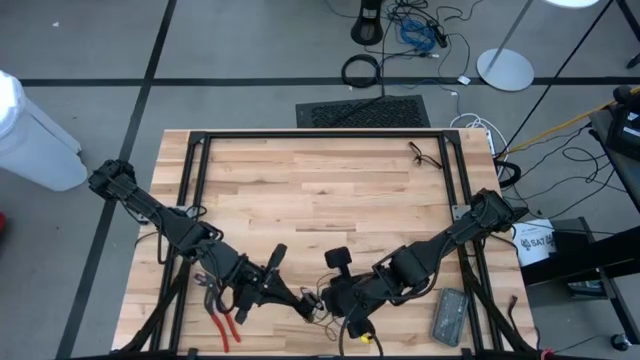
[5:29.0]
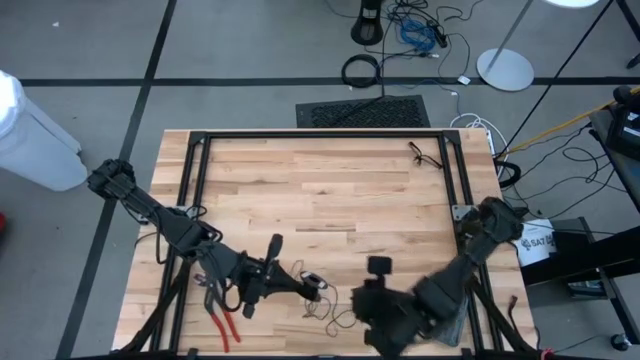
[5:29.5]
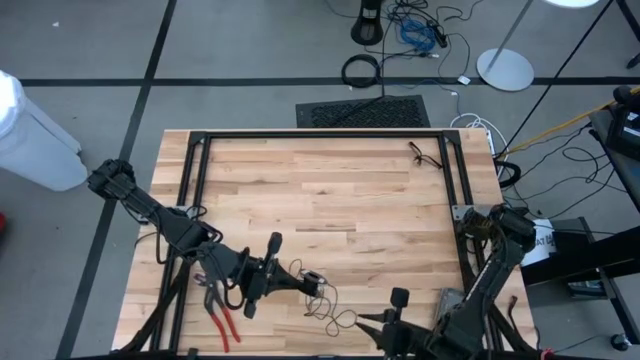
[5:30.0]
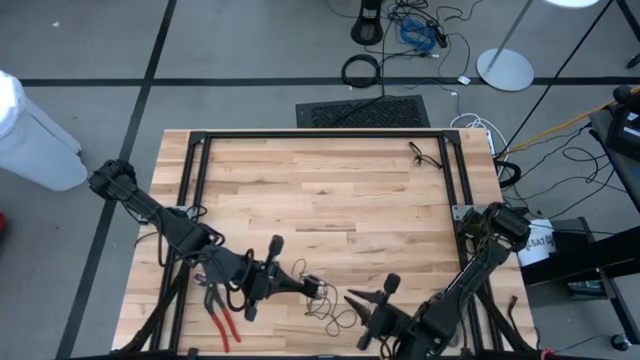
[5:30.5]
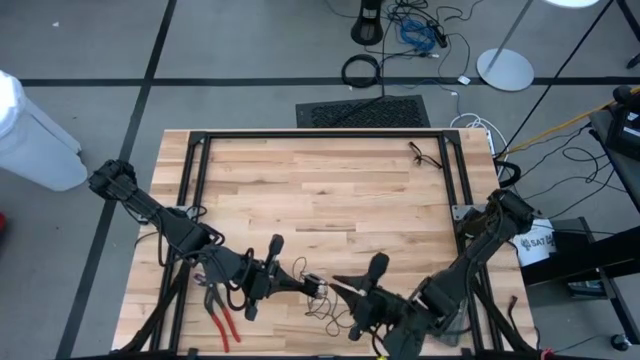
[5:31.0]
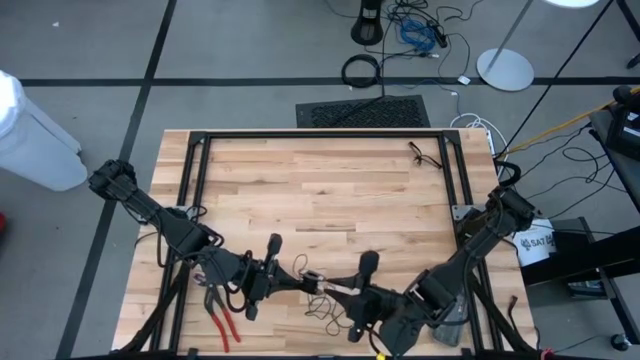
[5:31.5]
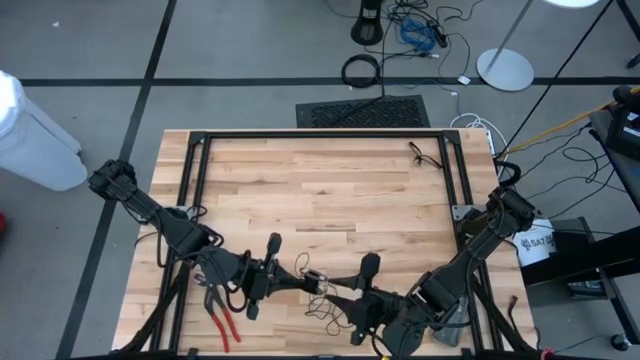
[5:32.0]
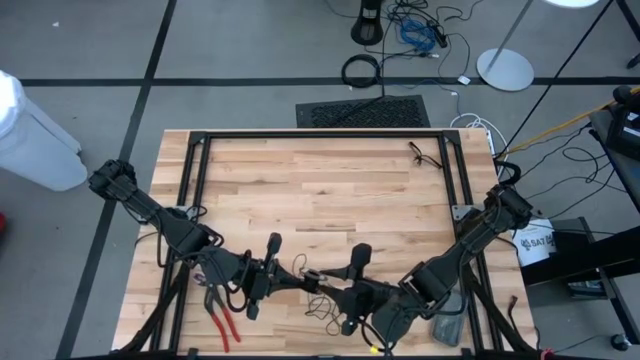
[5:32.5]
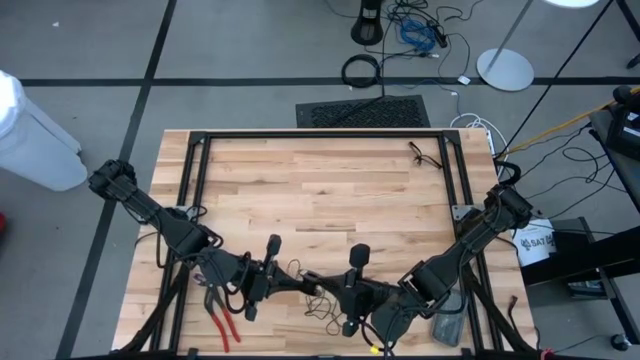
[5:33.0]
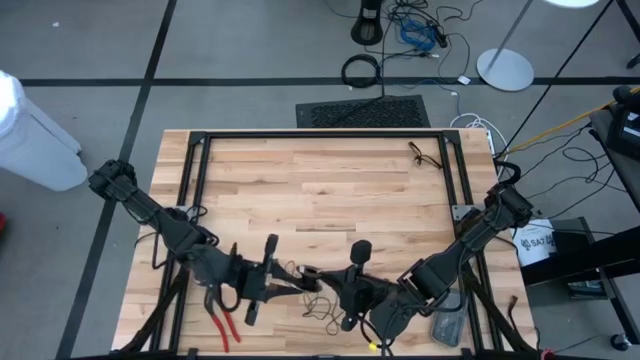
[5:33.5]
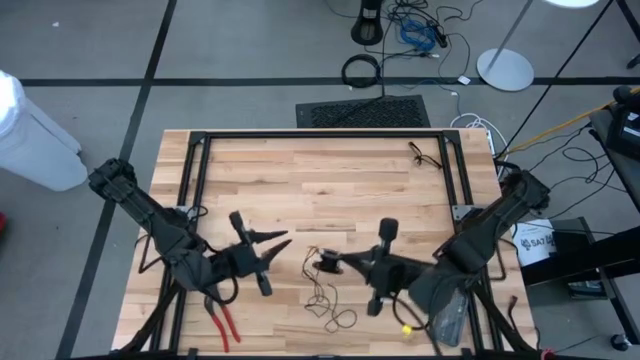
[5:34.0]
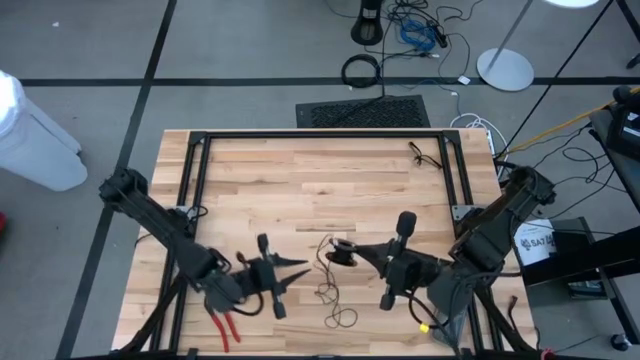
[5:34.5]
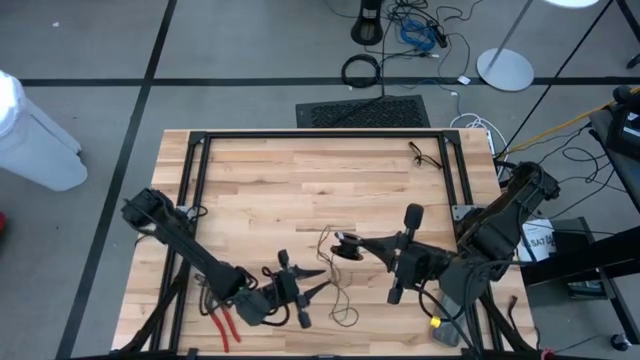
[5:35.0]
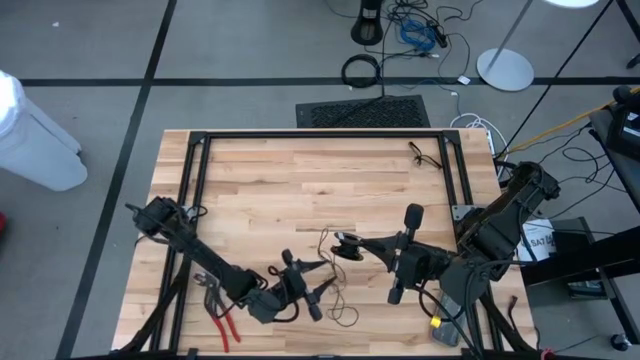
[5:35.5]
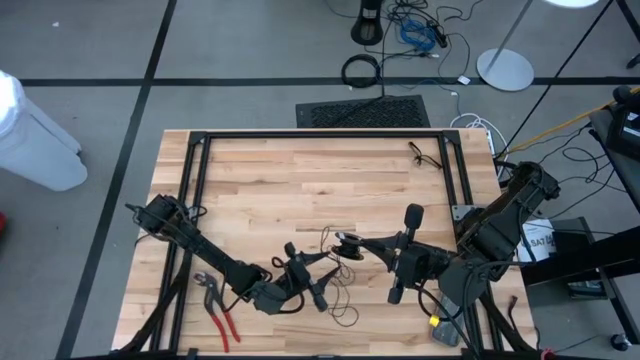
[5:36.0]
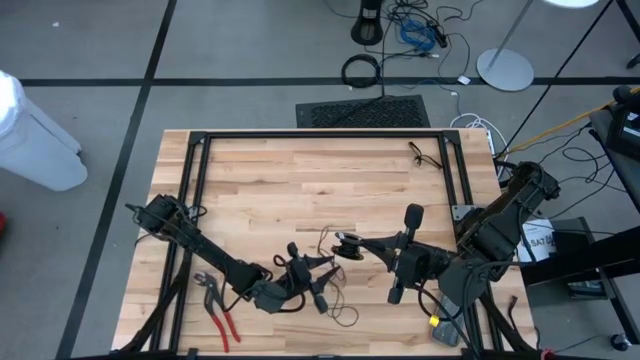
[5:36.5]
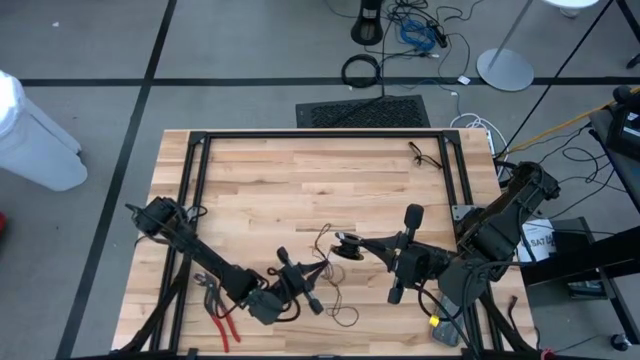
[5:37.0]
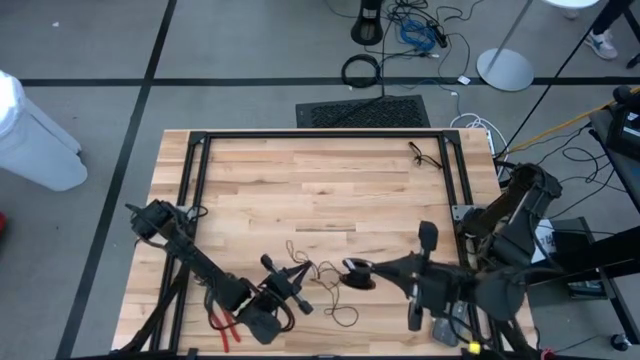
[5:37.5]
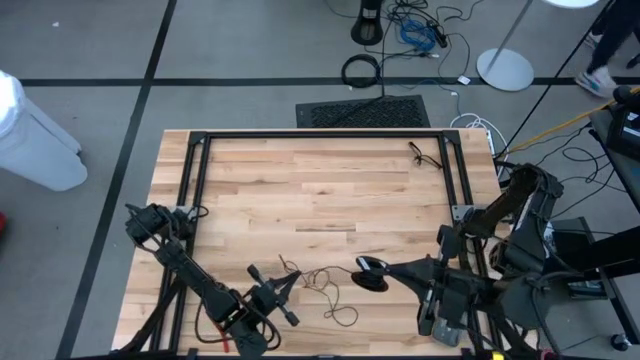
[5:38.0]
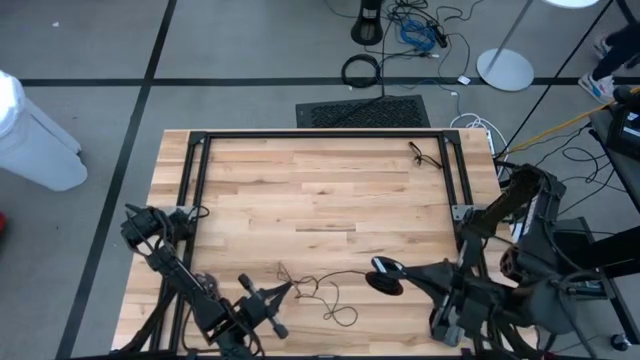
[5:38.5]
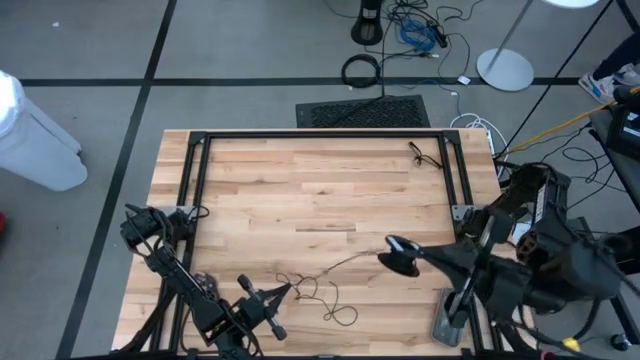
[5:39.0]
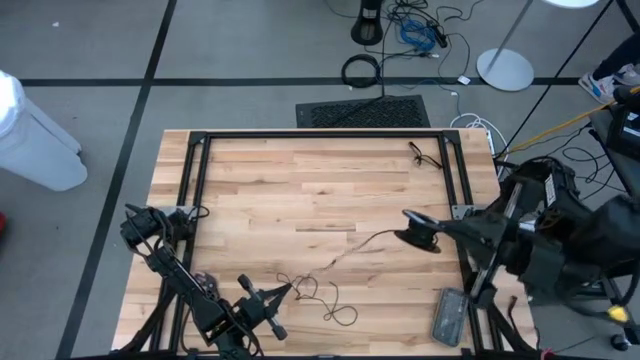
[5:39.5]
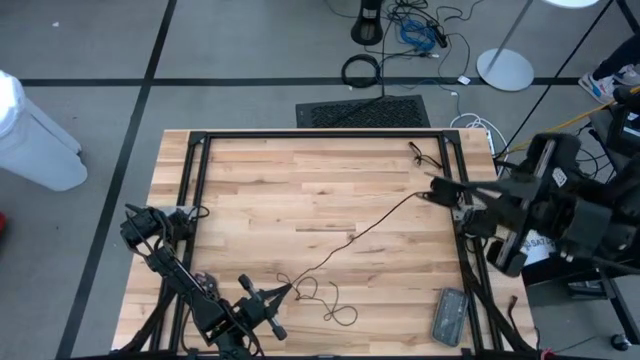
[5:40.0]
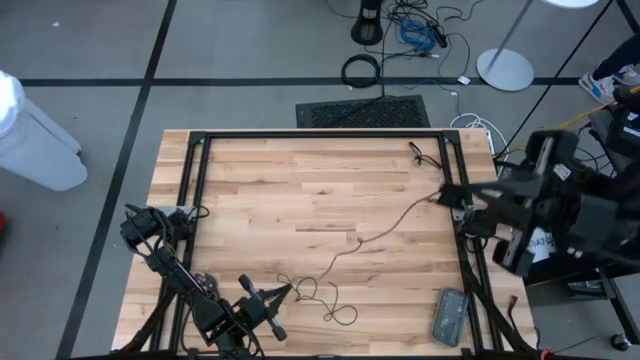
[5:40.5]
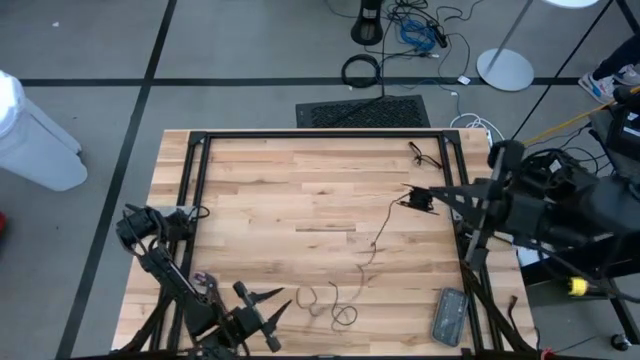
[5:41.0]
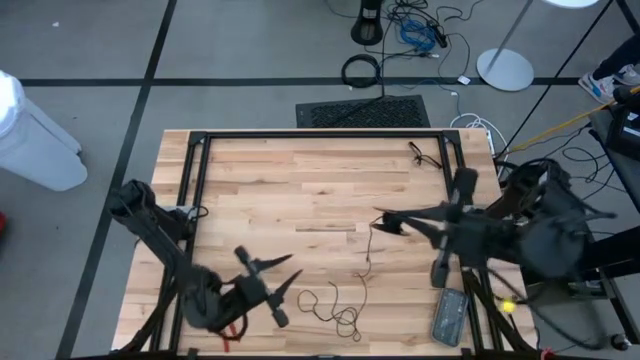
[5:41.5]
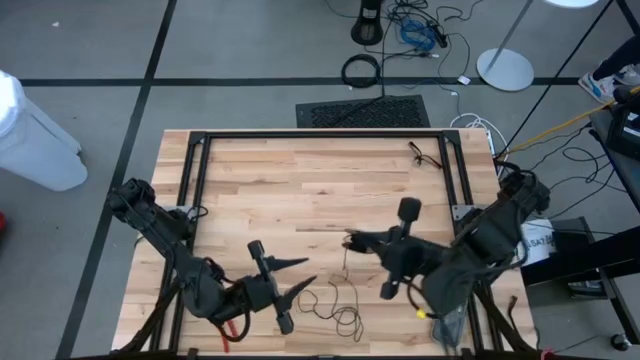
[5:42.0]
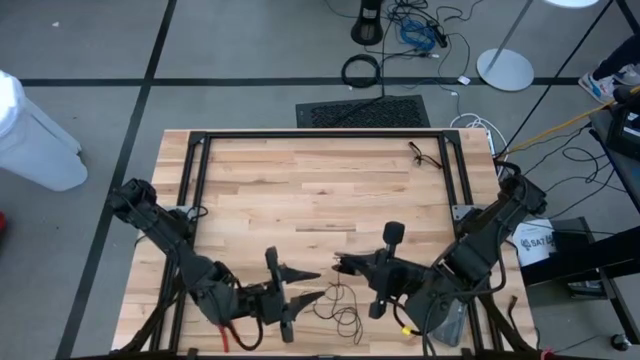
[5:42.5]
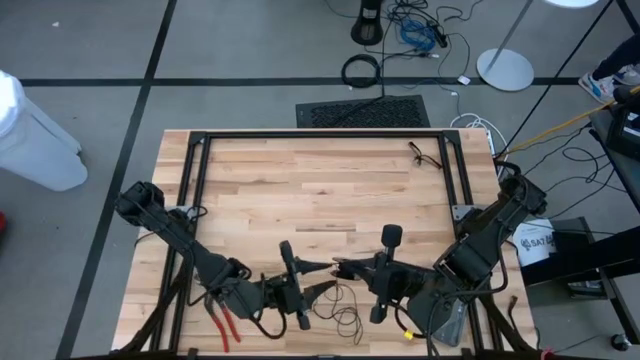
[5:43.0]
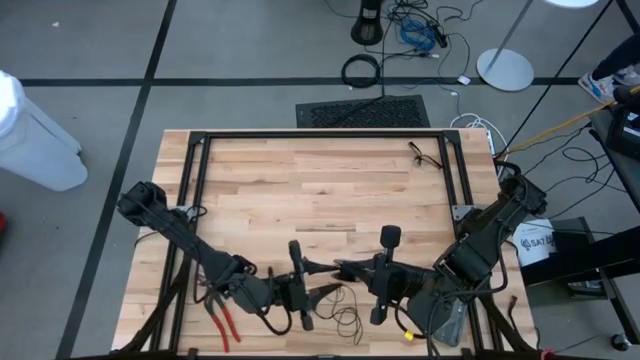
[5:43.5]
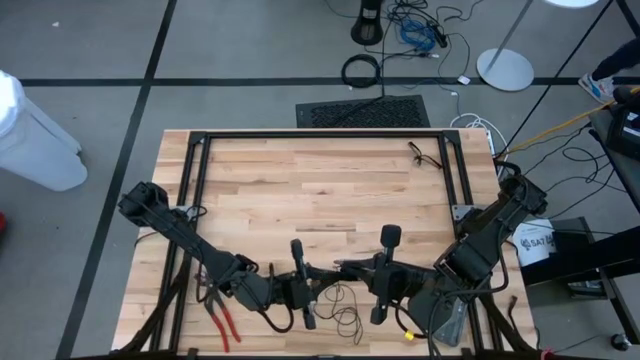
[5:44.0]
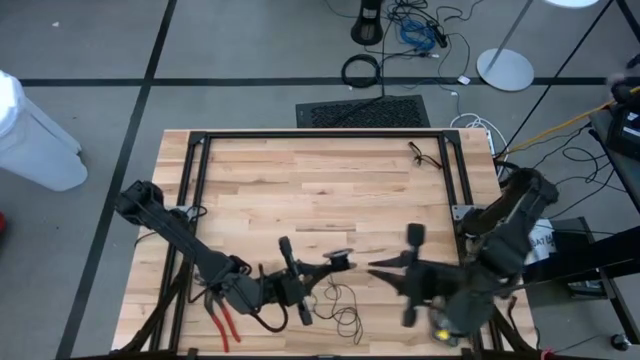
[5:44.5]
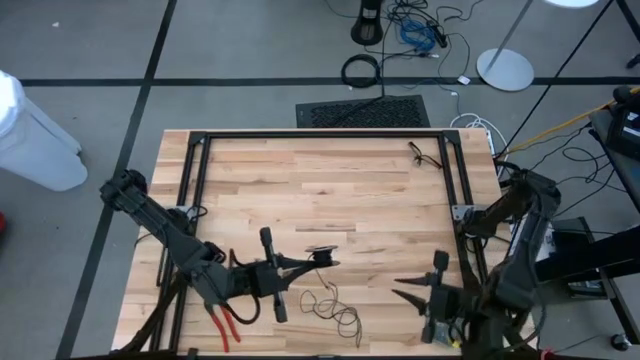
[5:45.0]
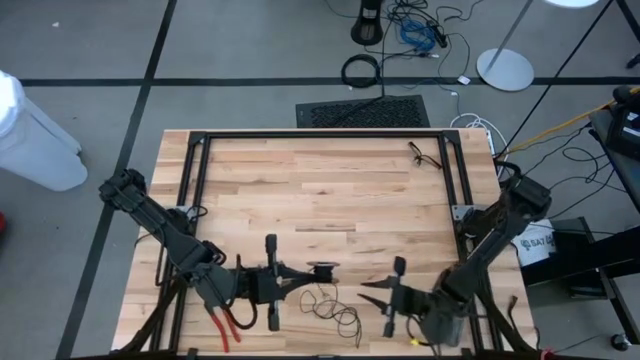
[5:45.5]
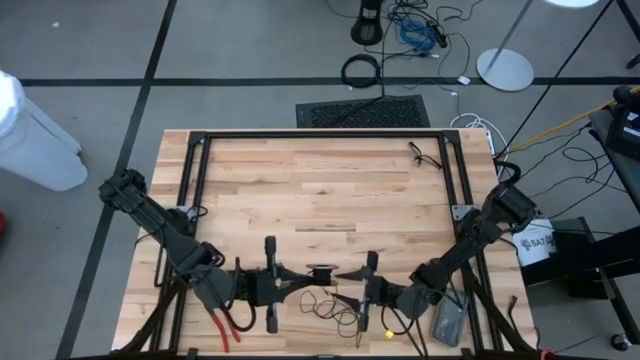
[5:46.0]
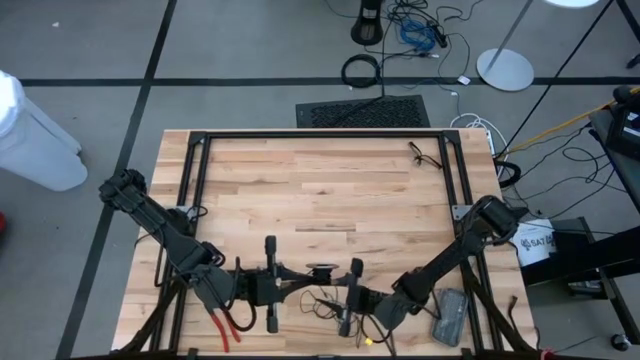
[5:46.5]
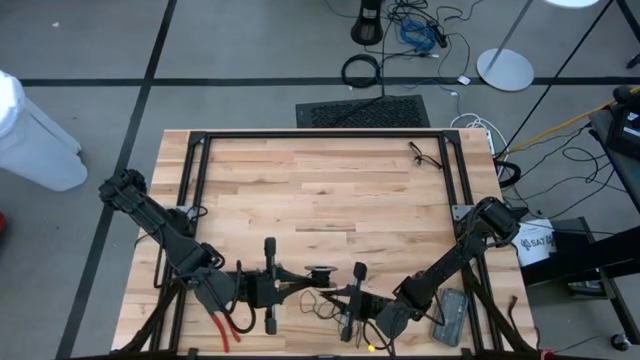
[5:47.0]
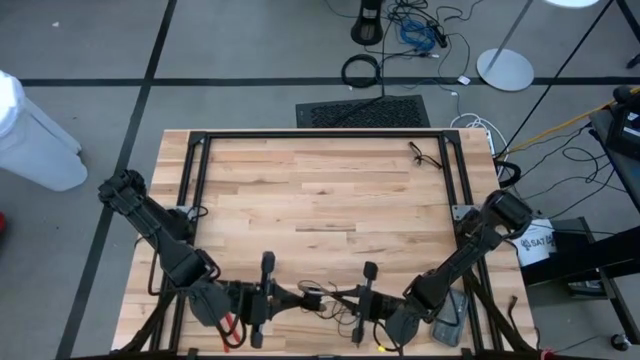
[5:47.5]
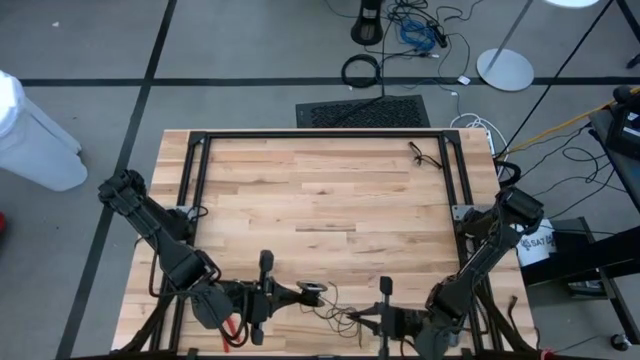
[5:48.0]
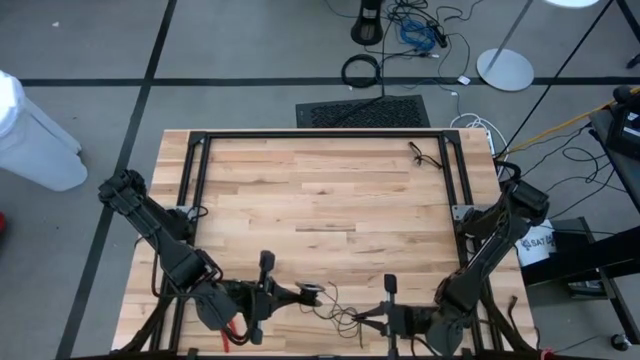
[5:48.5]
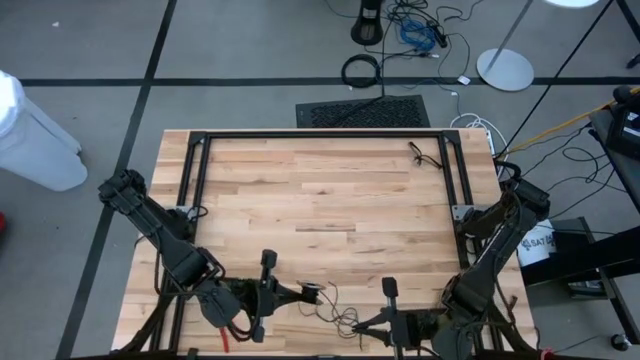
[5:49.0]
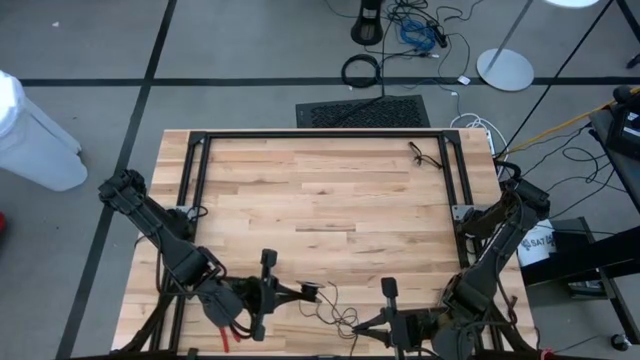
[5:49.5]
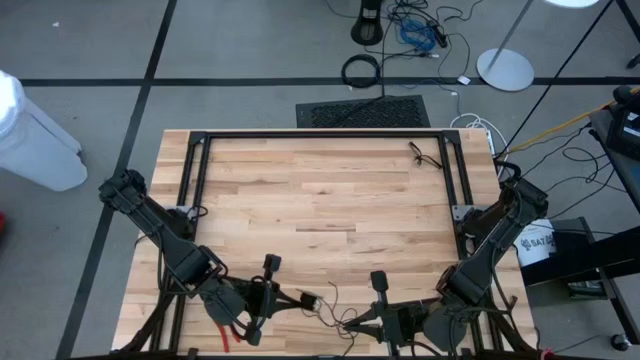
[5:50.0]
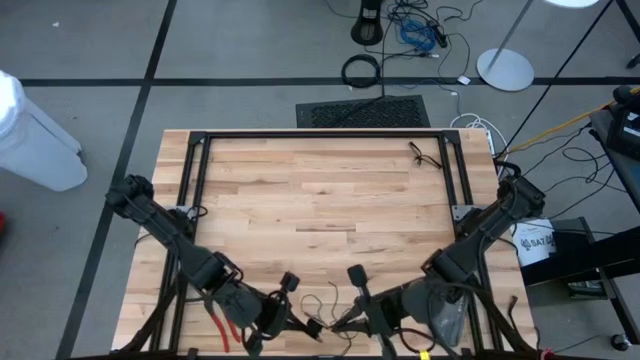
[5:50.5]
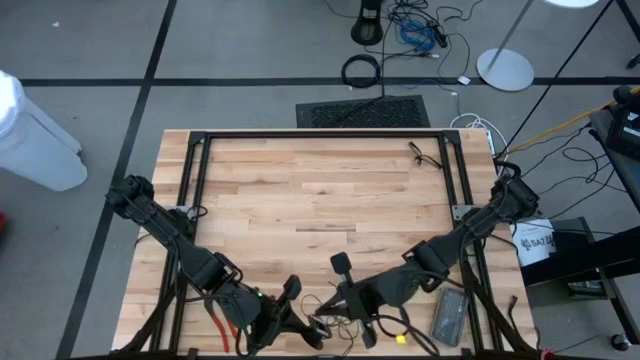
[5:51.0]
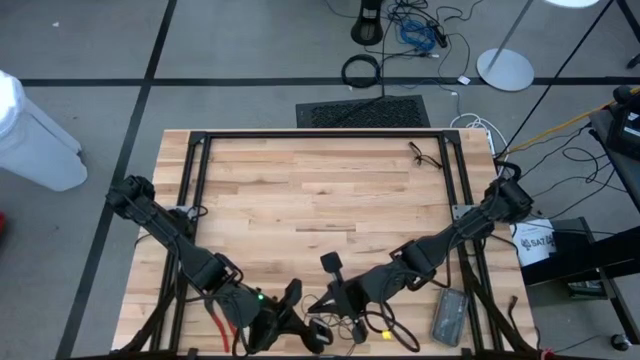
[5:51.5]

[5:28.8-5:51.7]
Task: Coil cords
Coil the black wire onto the black spool
